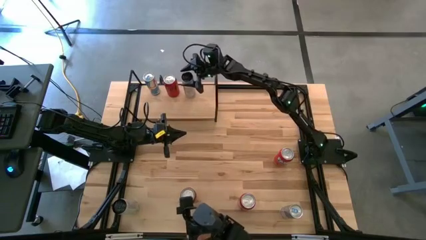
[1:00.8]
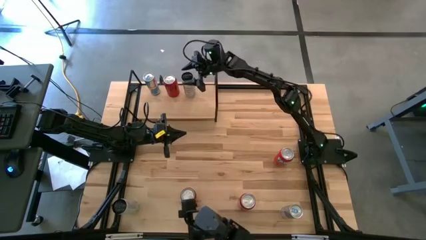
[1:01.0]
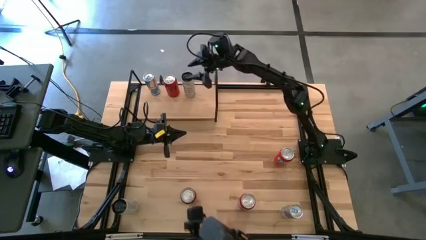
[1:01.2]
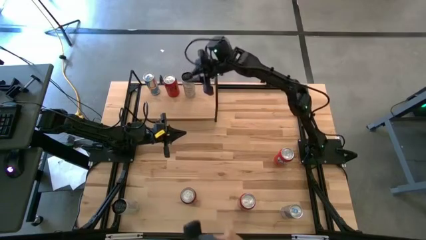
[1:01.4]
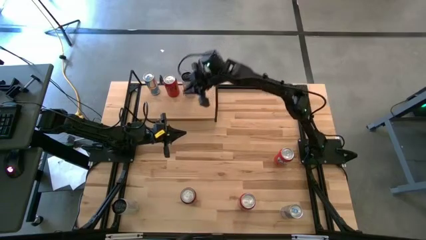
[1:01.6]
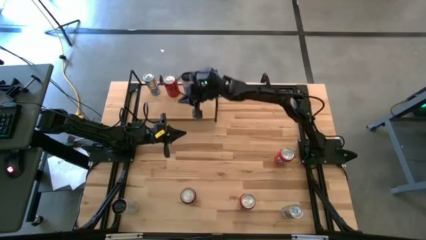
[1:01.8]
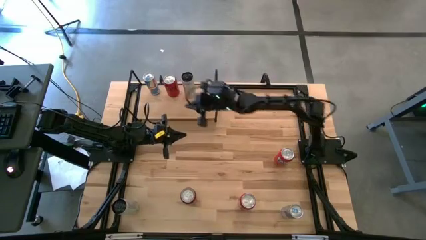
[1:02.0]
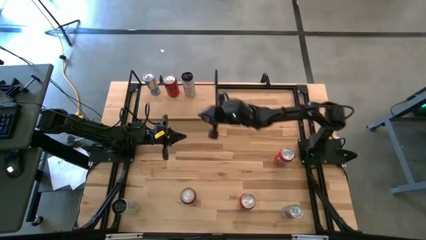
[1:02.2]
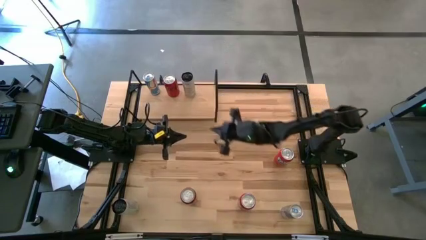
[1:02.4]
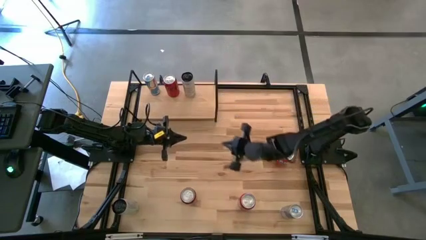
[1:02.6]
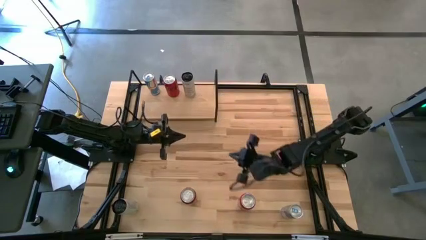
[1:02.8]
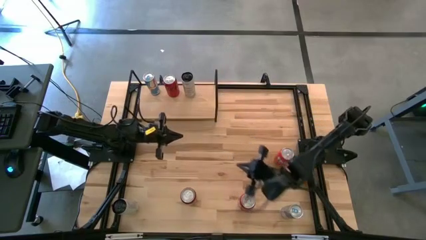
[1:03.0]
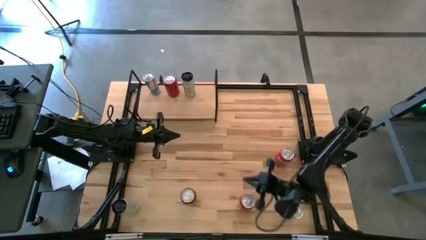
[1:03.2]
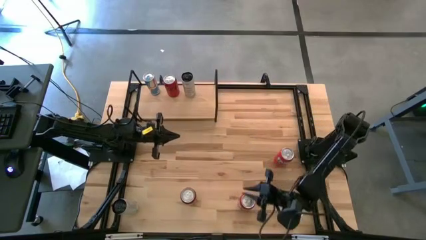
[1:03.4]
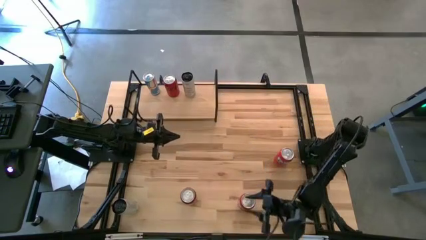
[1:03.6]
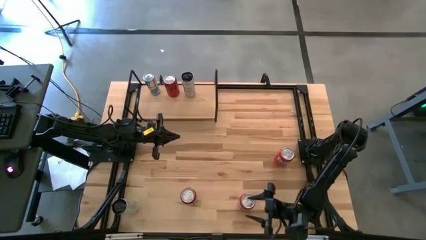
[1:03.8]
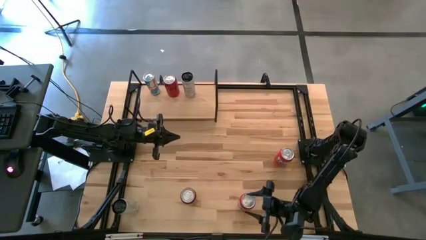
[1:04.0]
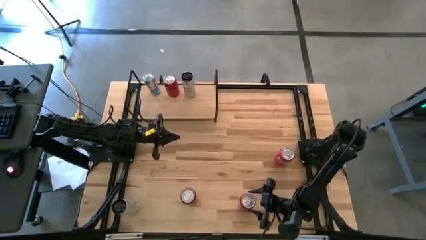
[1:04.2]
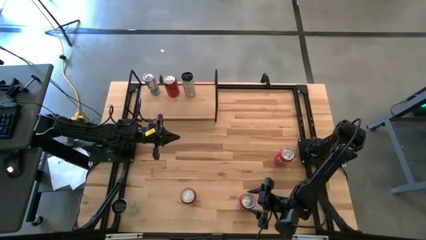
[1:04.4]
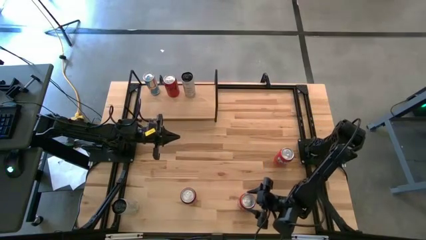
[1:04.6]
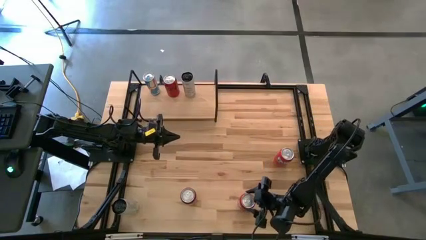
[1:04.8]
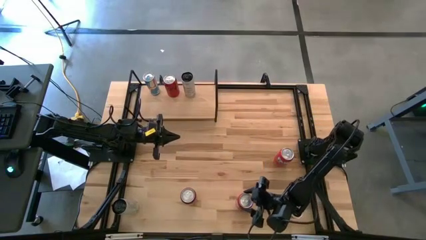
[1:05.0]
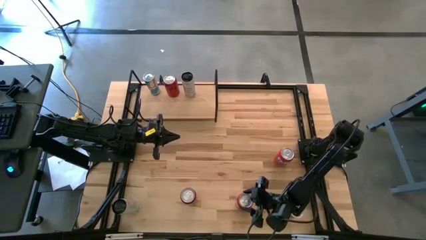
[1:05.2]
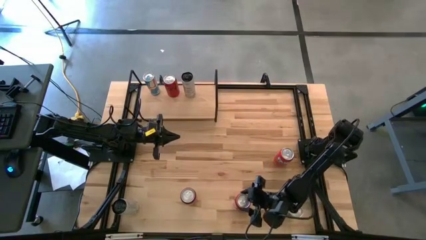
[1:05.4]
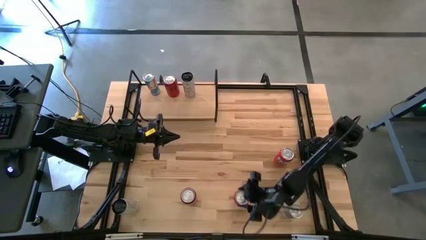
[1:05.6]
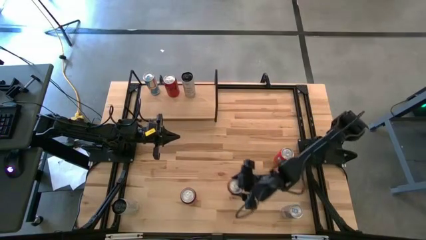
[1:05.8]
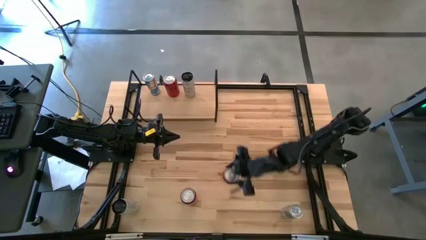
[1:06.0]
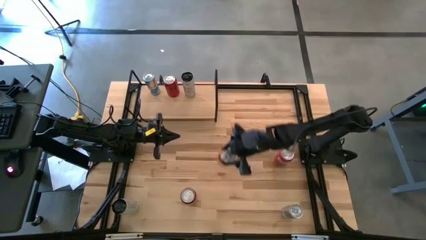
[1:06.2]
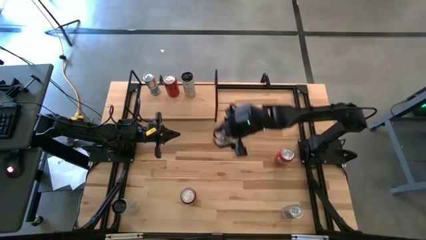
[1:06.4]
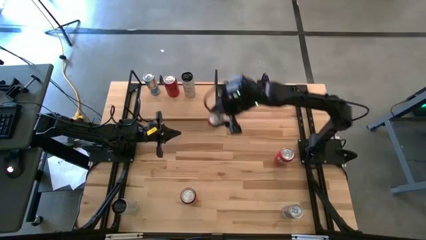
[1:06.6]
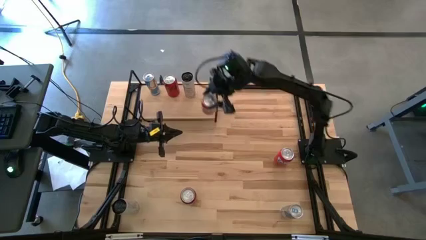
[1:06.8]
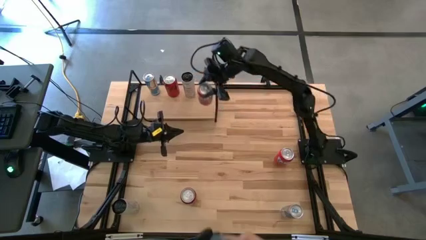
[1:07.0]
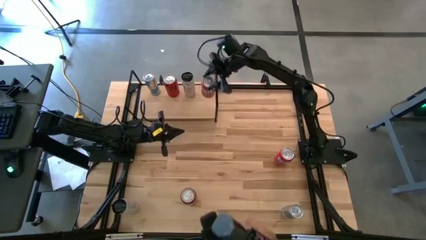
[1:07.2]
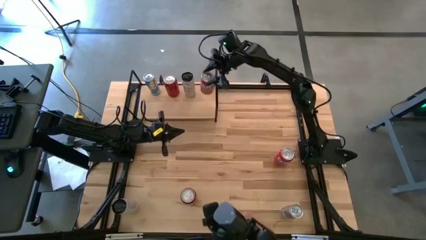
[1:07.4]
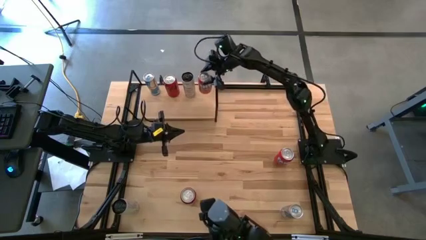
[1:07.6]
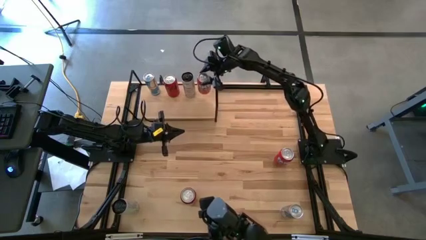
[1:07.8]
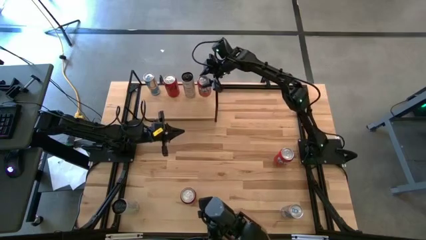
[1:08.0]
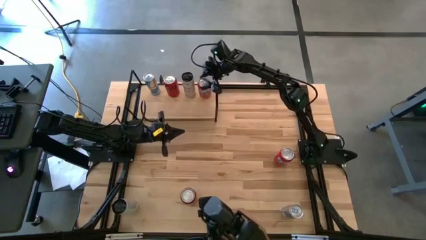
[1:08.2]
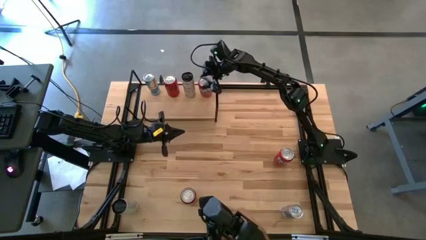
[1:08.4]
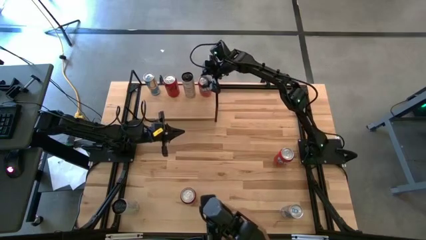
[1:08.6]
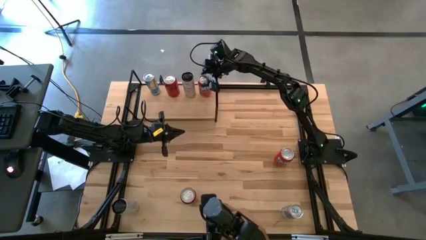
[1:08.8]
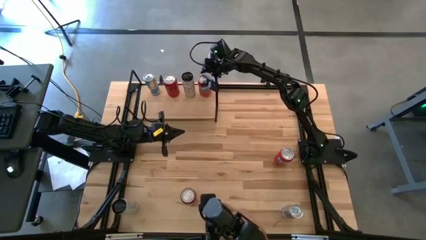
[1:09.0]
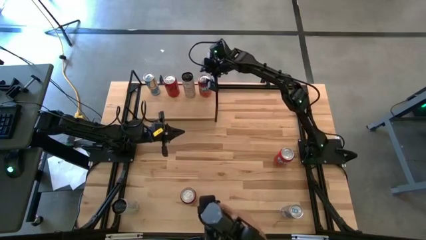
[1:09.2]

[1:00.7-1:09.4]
Task: Place canned beverage on shelf
Put the bottom red soda can on the shelf

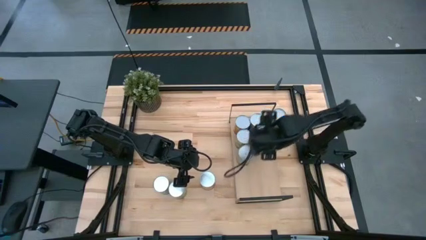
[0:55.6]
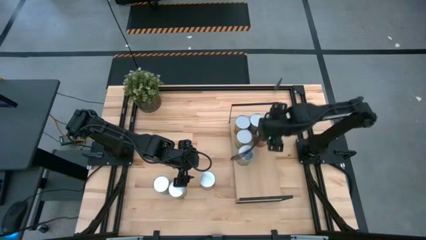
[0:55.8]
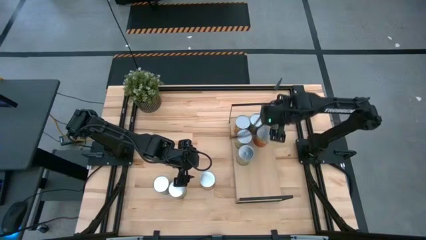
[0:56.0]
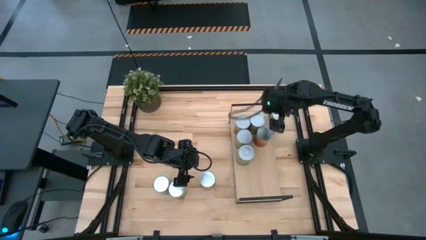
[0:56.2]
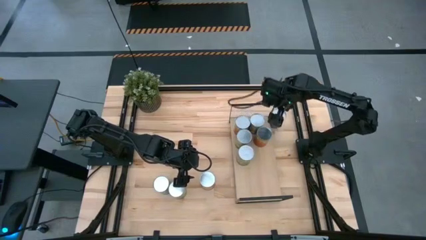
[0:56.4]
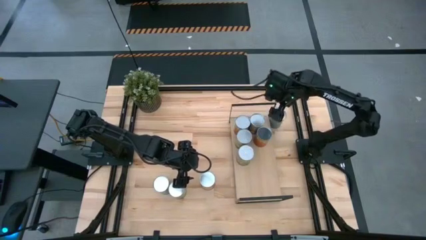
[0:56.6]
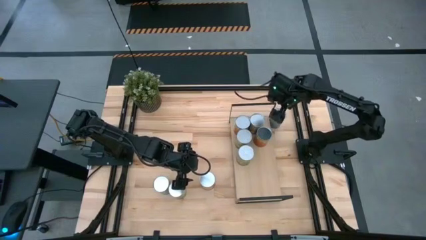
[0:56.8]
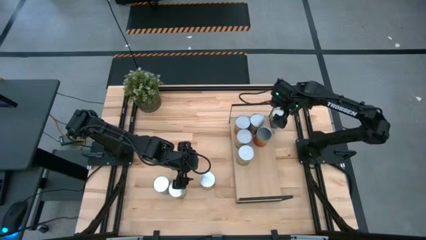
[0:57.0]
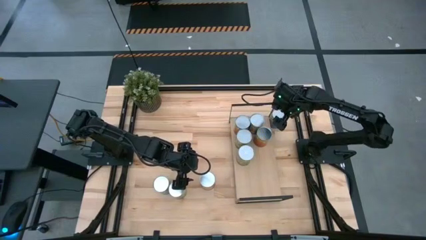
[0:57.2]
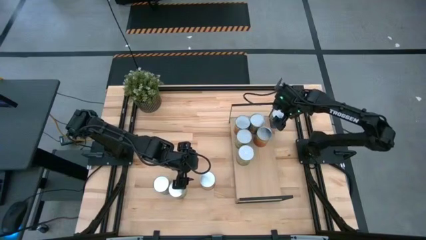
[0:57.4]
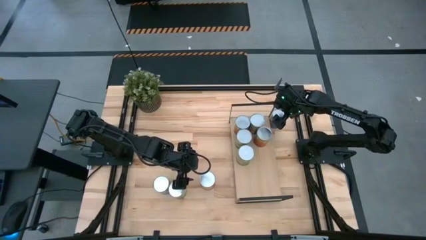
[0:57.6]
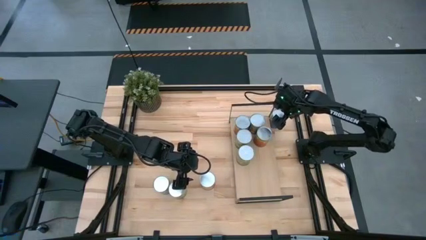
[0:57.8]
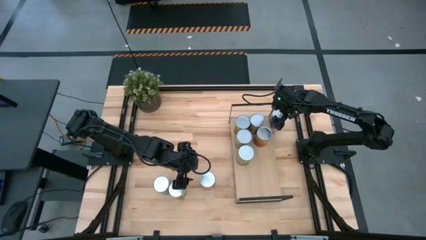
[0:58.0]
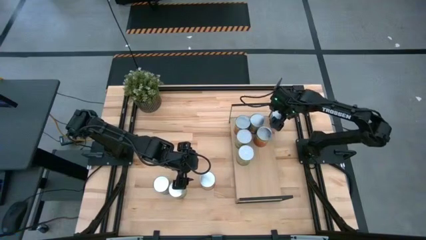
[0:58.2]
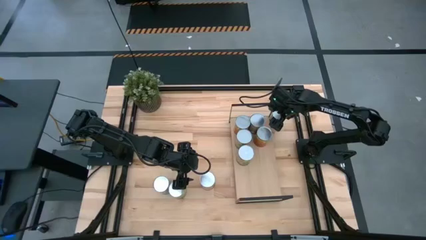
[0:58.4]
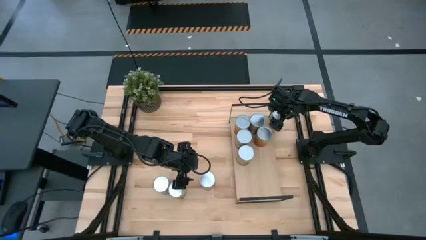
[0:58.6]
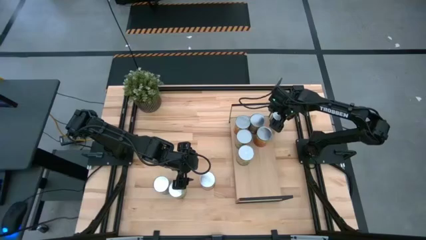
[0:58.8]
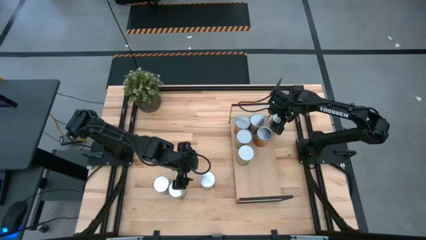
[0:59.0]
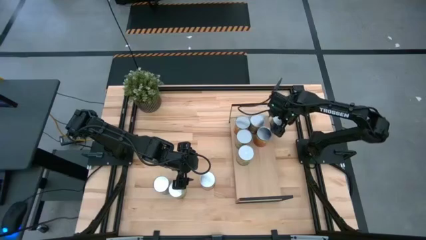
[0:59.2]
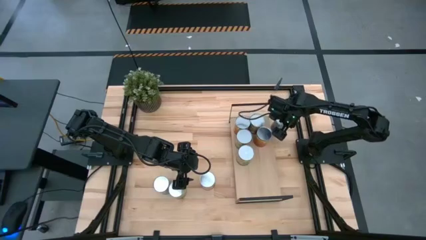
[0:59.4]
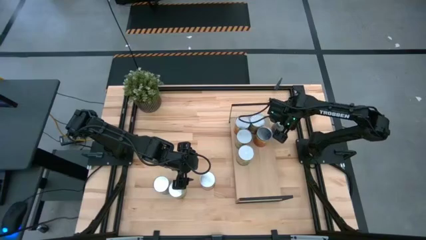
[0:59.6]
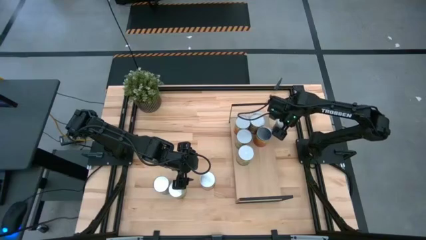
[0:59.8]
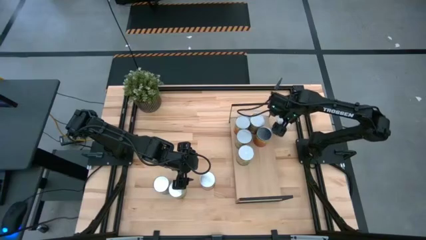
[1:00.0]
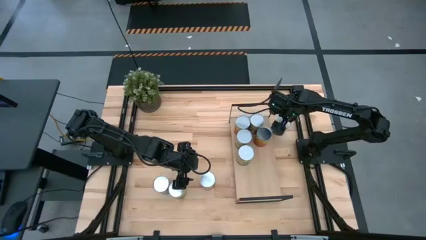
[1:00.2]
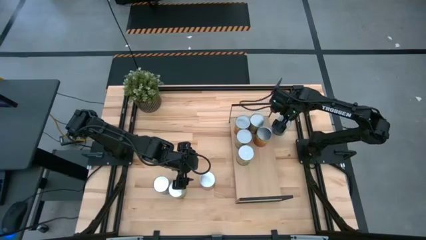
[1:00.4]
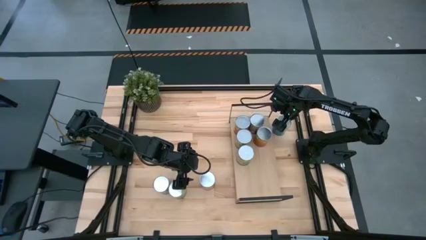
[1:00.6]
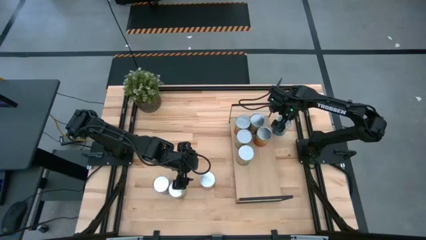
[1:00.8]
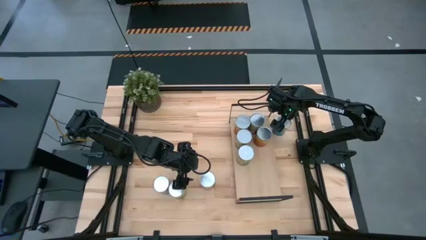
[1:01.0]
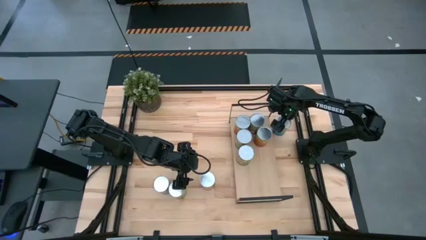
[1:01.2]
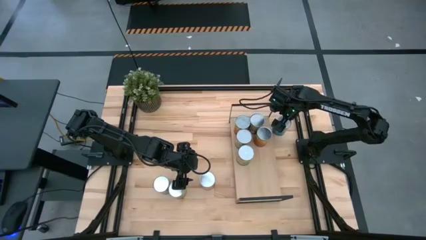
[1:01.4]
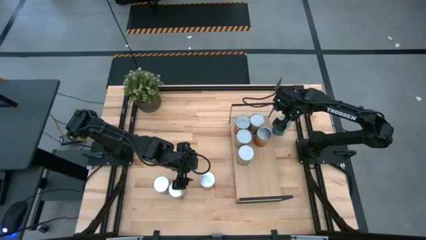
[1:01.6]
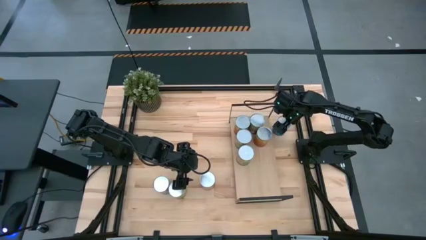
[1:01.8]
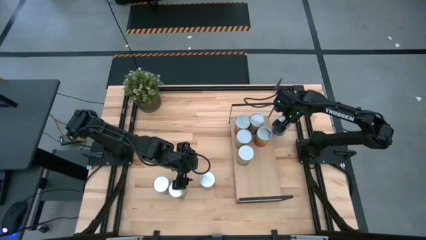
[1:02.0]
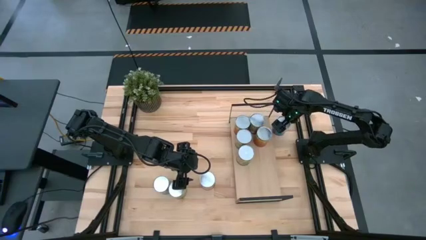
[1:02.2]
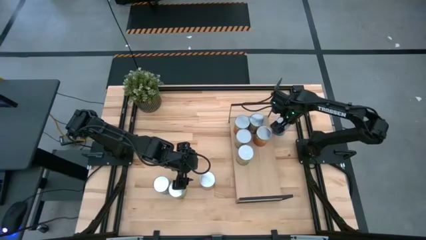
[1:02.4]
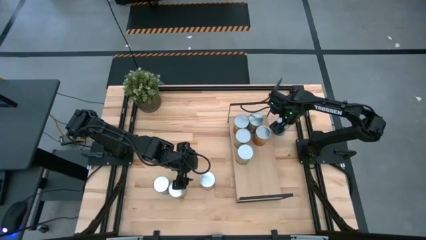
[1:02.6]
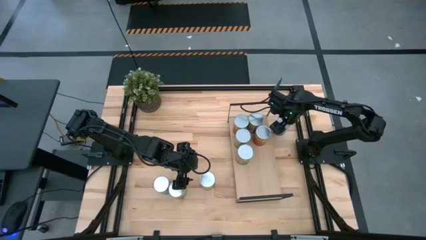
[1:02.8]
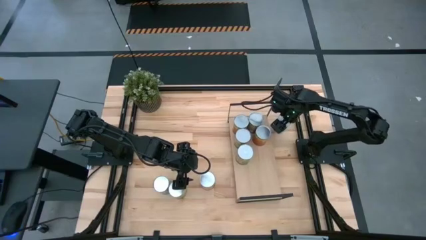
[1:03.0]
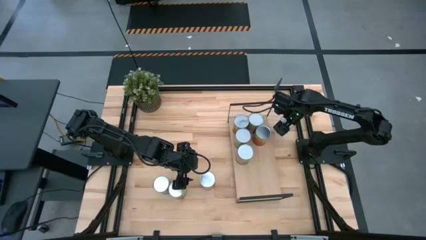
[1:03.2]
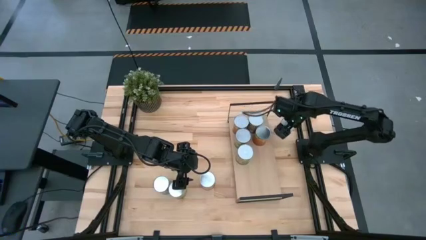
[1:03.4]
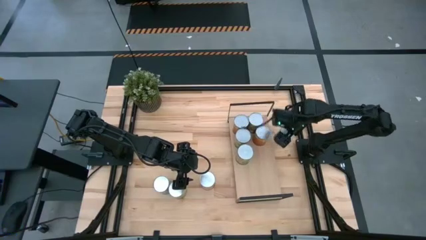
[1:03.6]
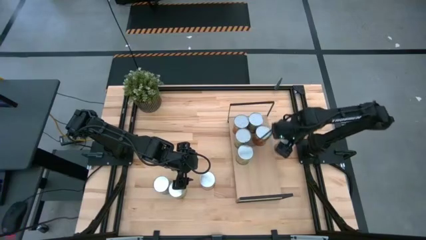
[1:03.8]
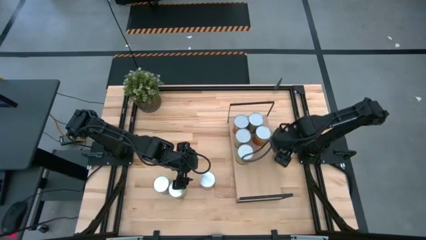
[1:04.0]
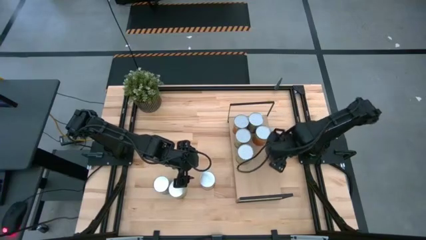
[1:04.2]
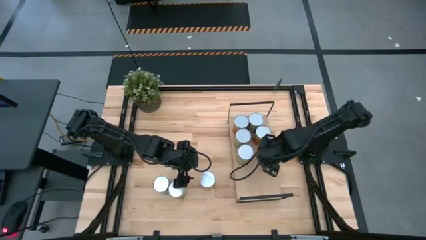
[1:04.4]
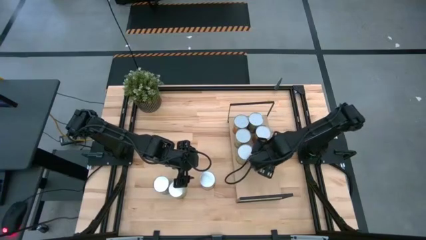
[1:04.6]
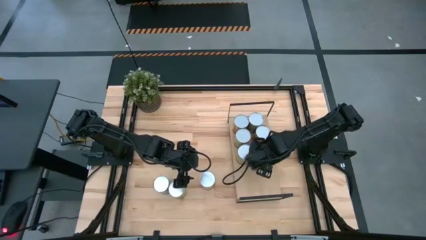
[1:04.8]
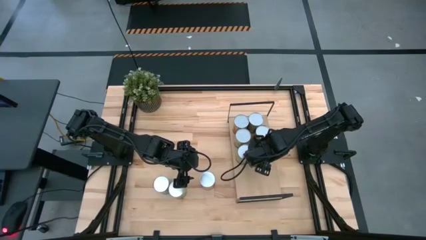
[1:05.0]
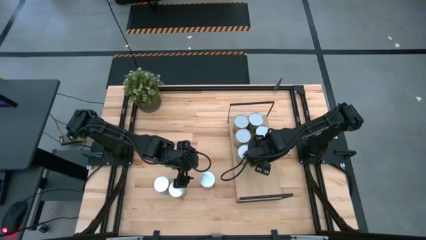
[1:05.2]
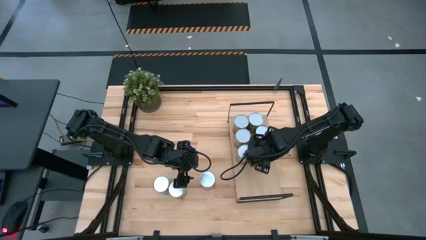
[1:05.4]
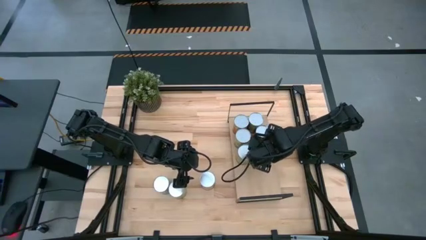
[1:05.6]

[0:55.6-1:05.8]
Task: Pick and place cans onto a shelf
Put the canned cherries on the shelf
